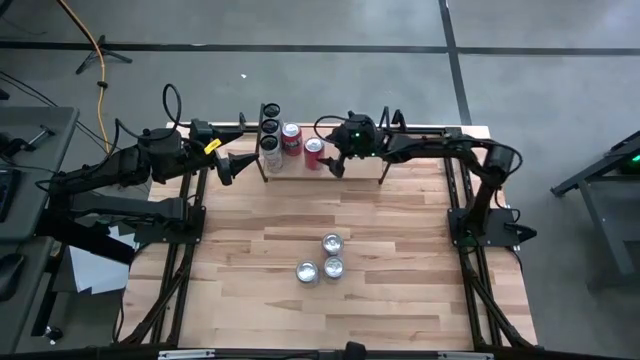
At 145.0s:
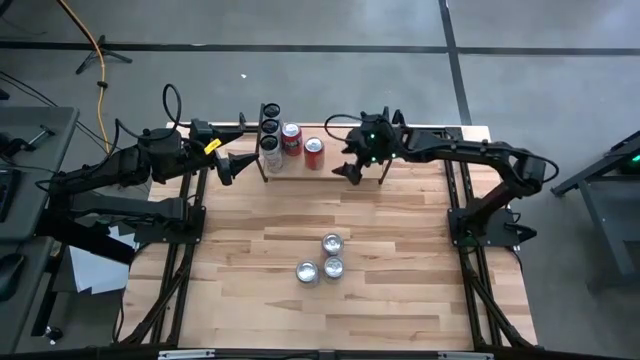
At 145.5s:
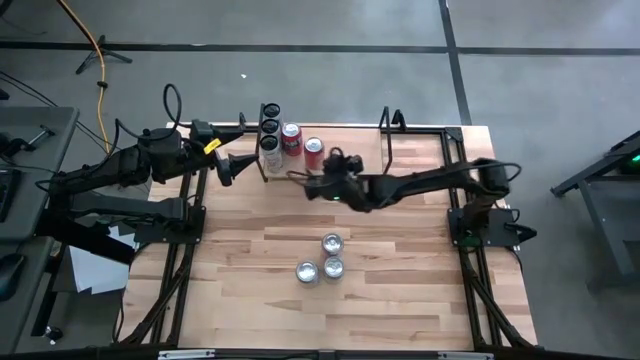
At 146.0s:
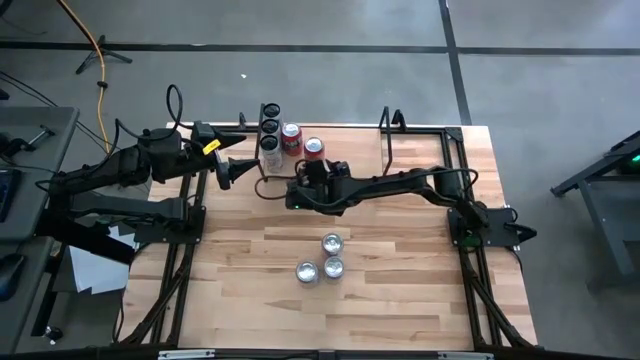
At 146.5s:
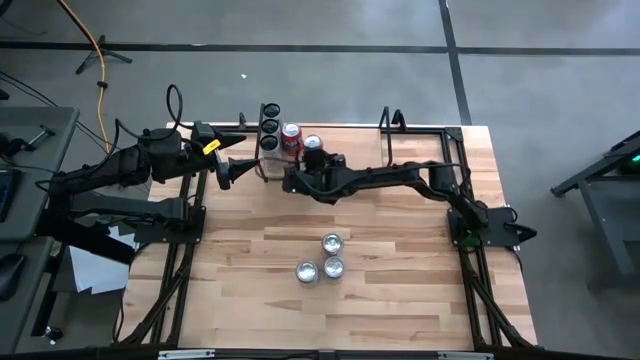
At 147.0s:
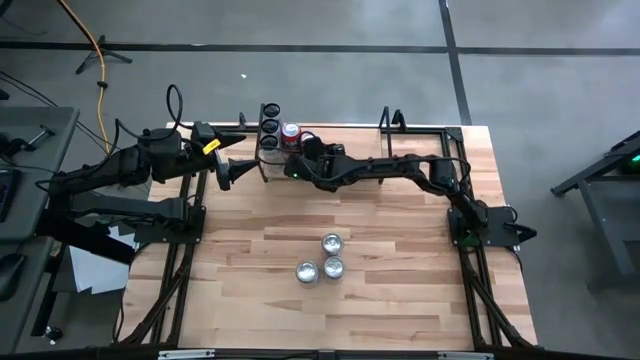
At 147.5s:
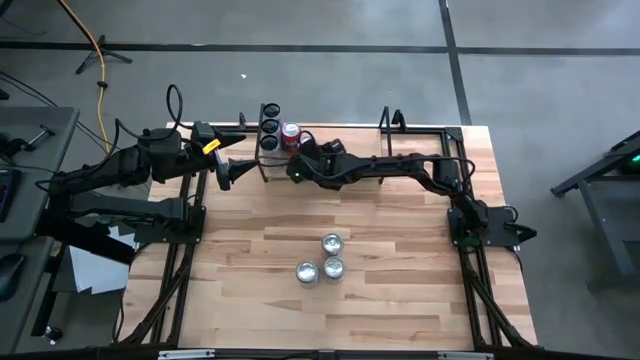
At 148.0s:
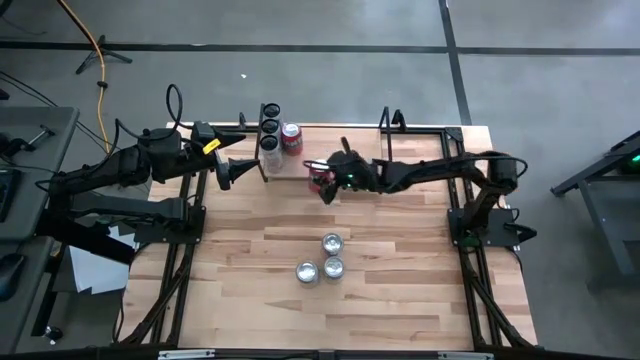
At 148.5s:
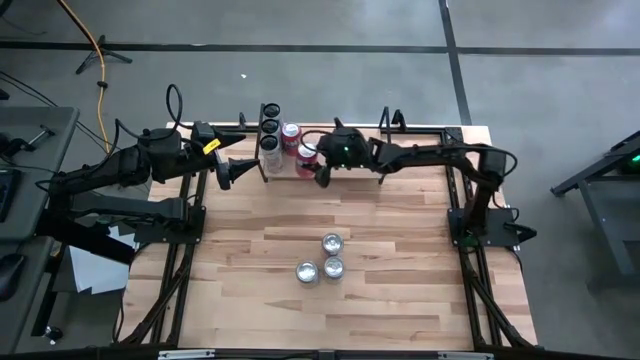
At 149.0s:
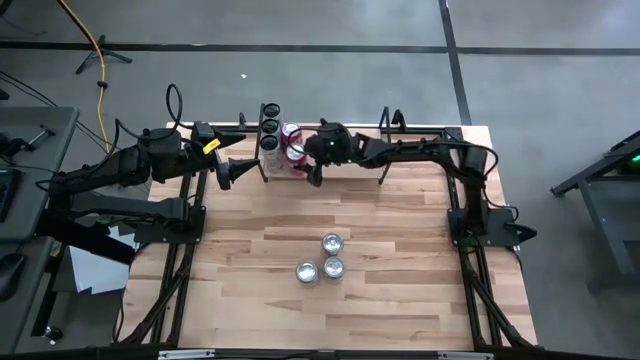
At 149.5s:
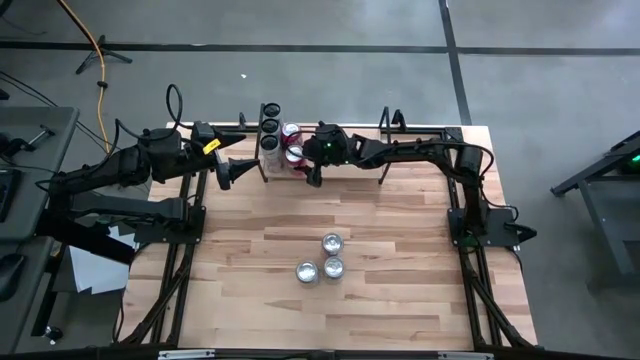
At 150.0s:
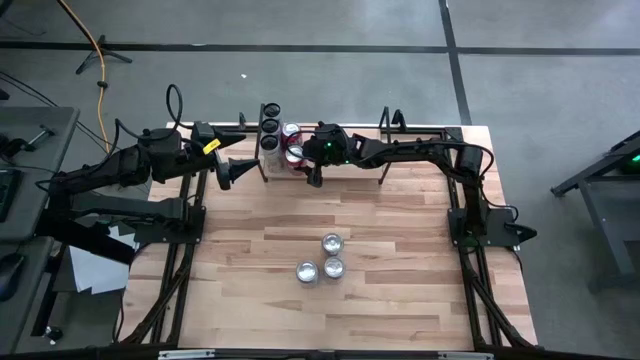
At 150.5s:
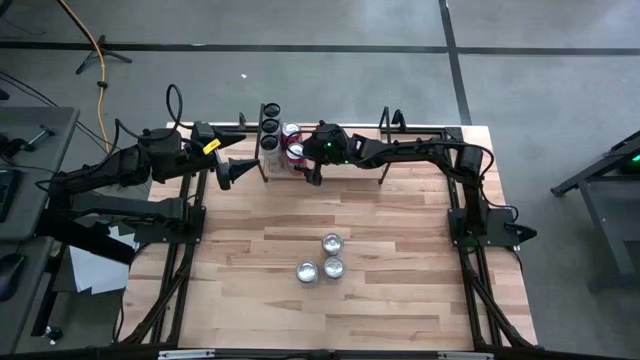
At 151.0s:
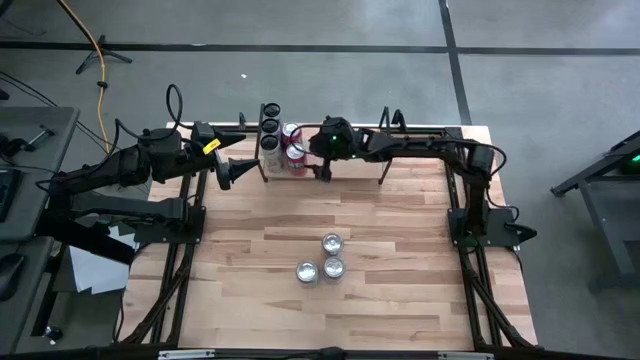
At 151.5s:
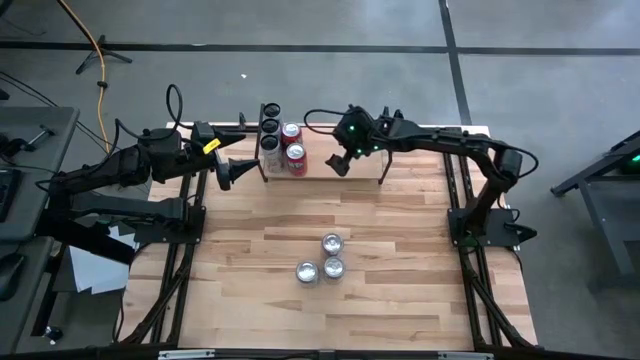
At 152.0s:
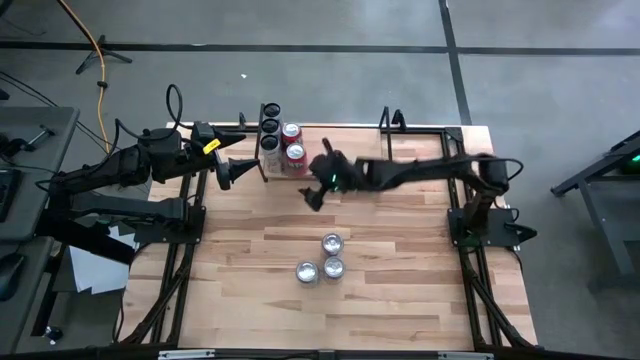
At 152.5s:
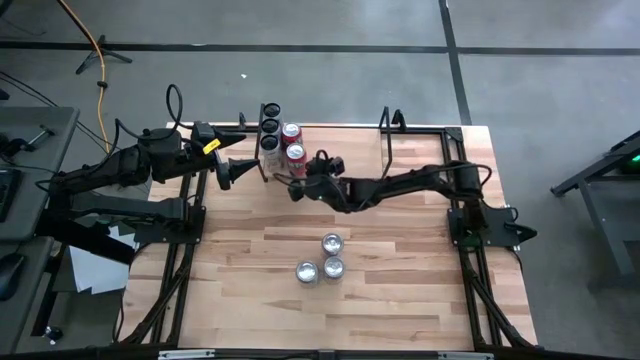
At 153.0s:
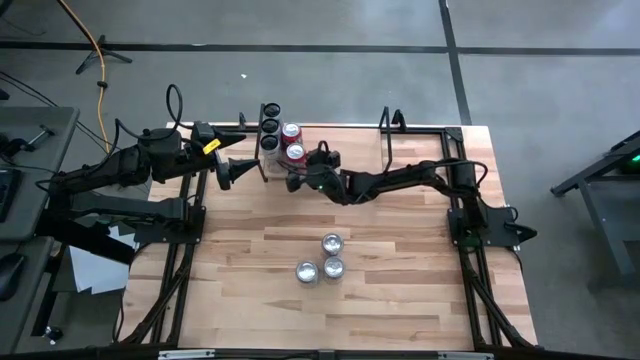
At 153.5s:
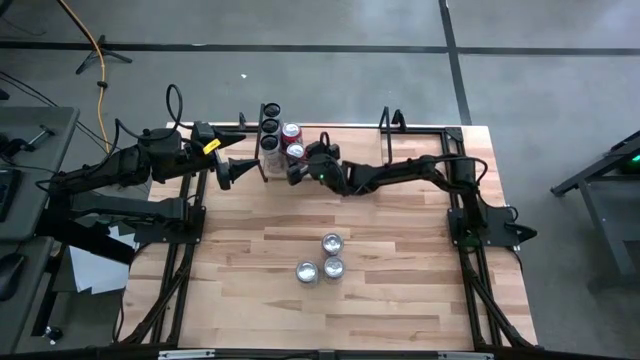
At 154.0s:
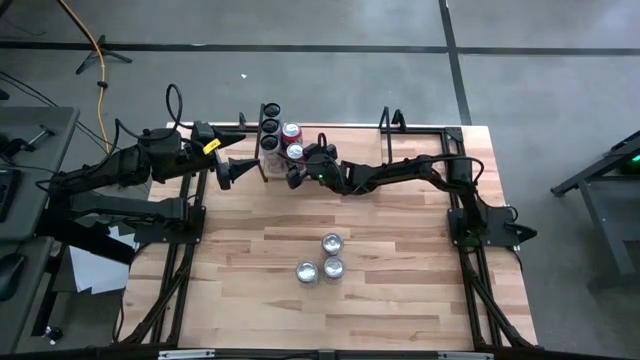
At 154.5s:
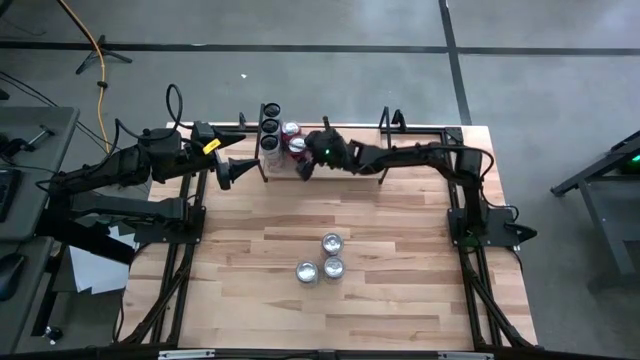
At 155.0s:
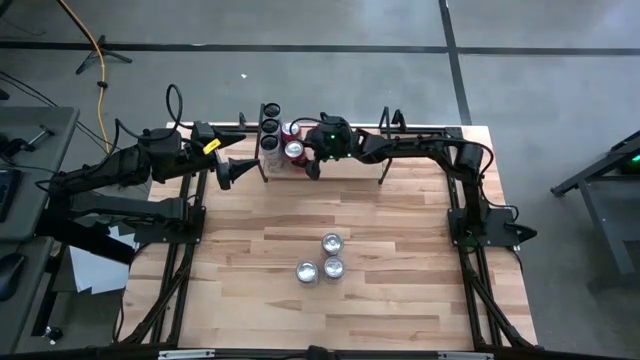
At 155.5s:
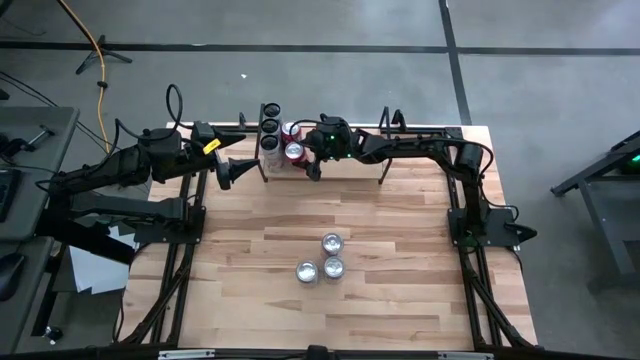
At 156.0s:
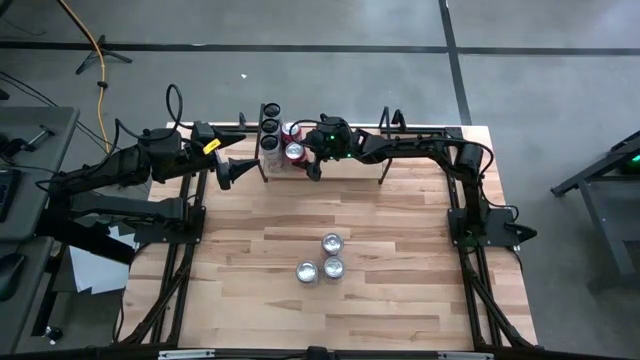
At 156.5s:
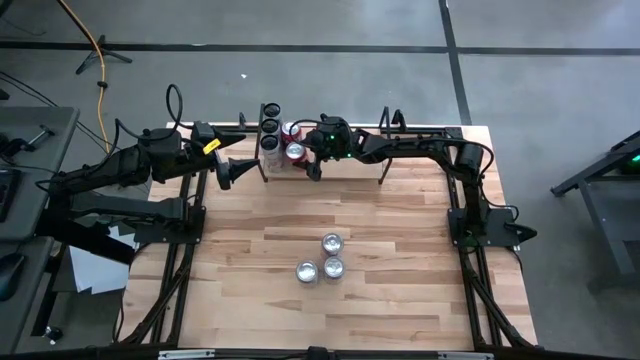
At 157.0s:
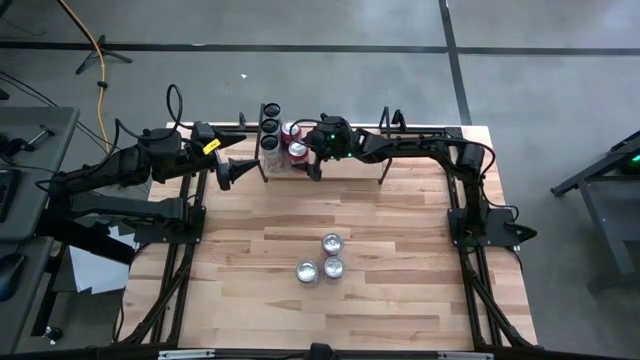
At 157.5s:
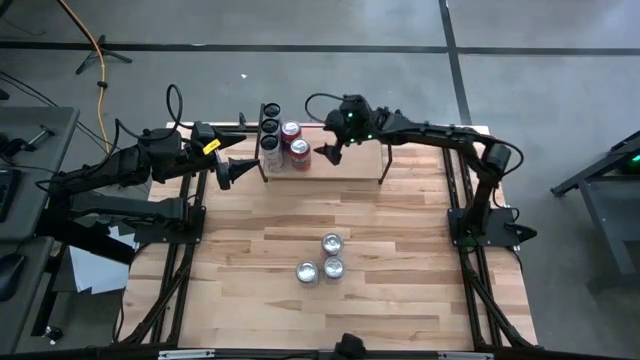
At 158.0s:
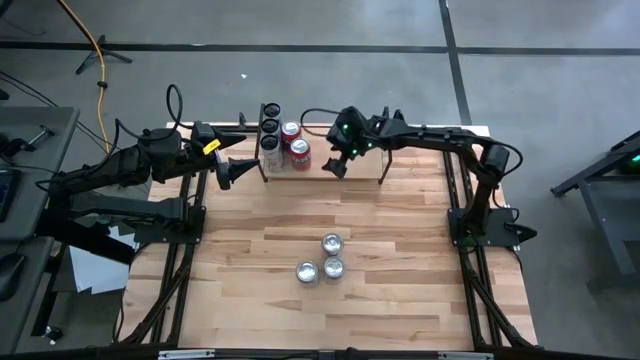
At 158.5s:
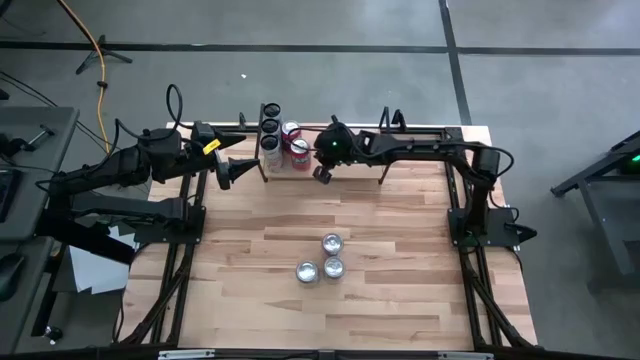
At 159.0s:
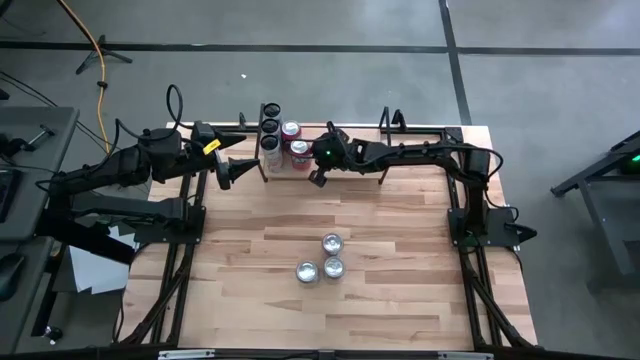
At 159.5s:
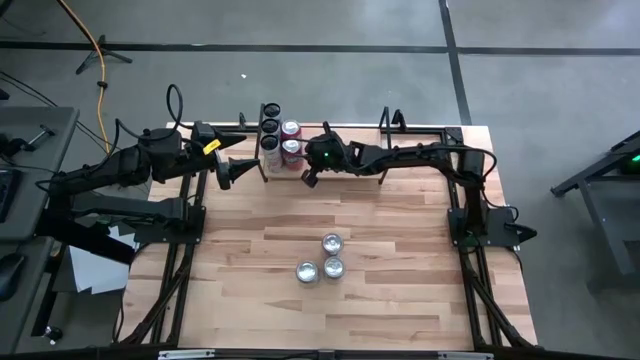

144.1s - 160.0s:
Task: Place canned beverage on shelf
Put the orange soda can aligned with the other orange soda can on the shelf

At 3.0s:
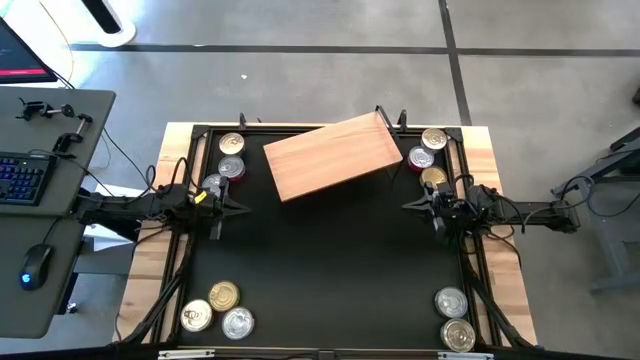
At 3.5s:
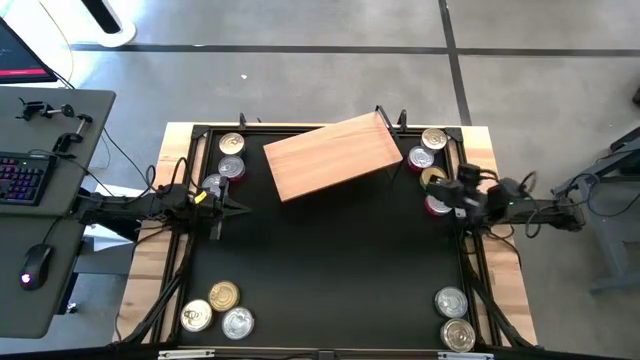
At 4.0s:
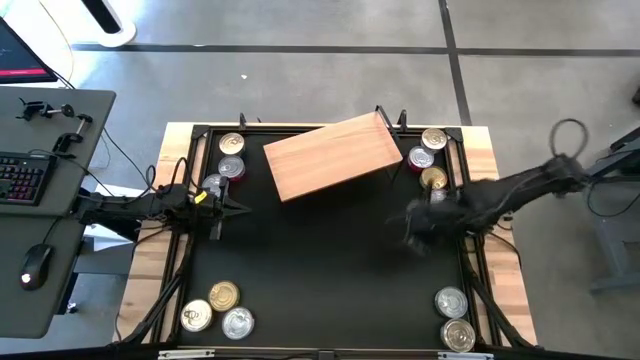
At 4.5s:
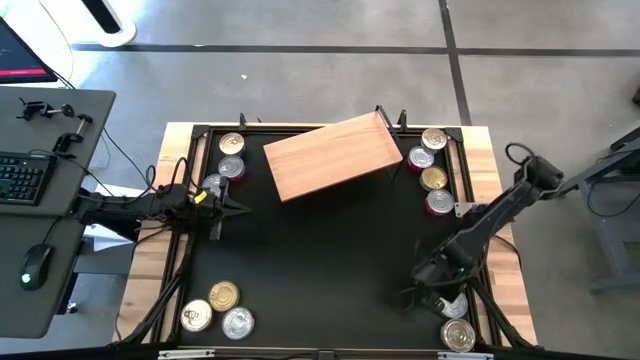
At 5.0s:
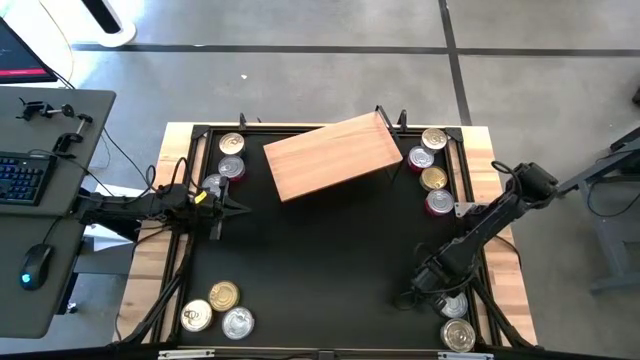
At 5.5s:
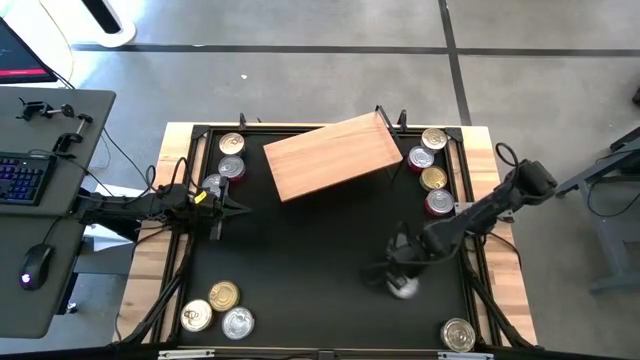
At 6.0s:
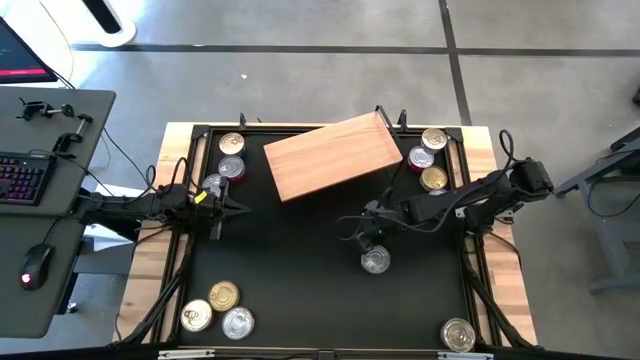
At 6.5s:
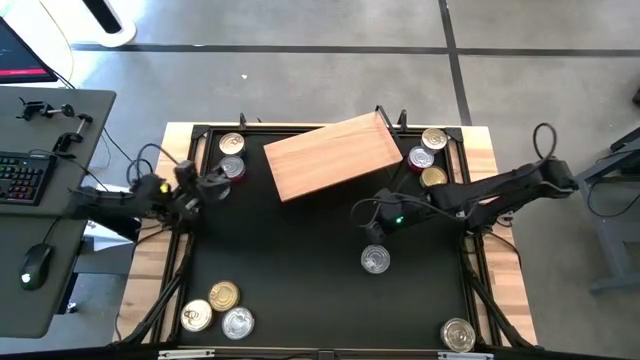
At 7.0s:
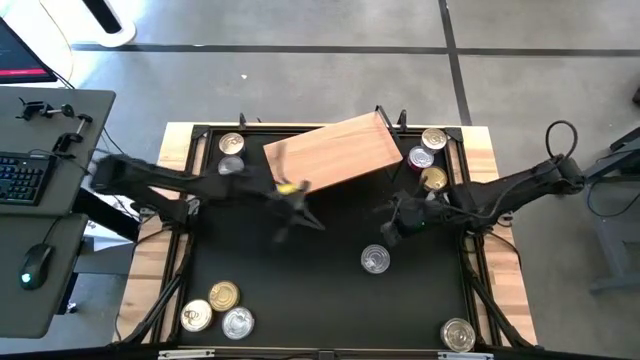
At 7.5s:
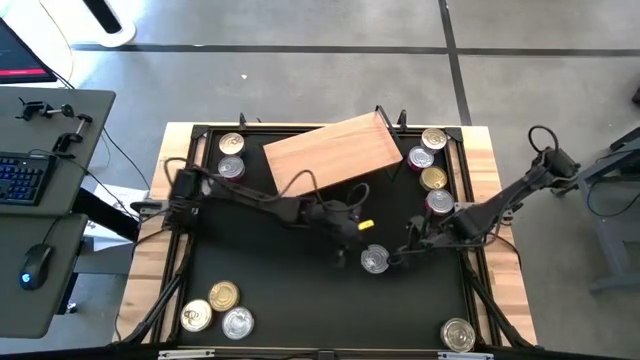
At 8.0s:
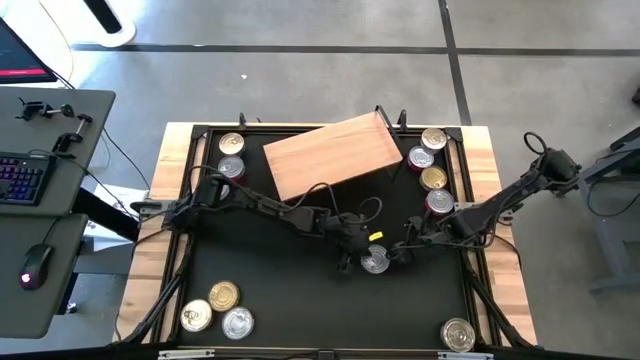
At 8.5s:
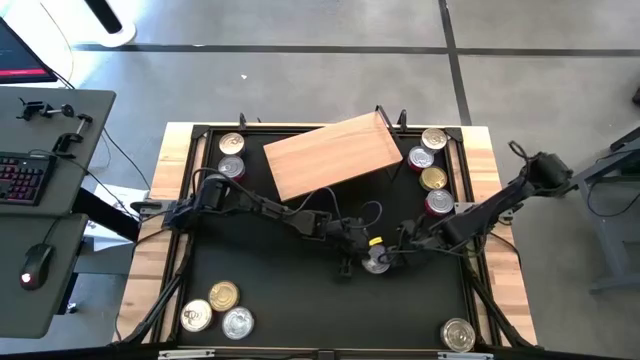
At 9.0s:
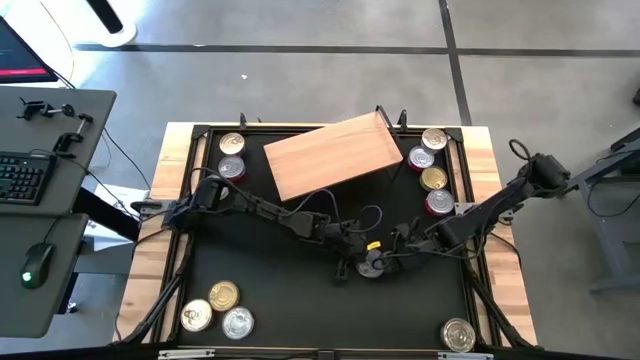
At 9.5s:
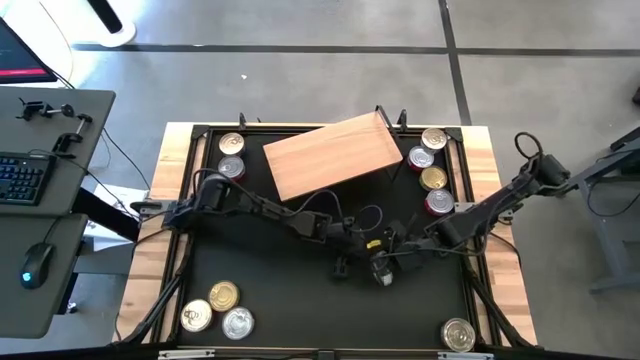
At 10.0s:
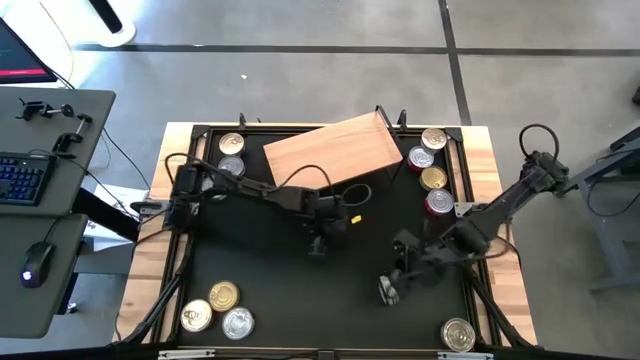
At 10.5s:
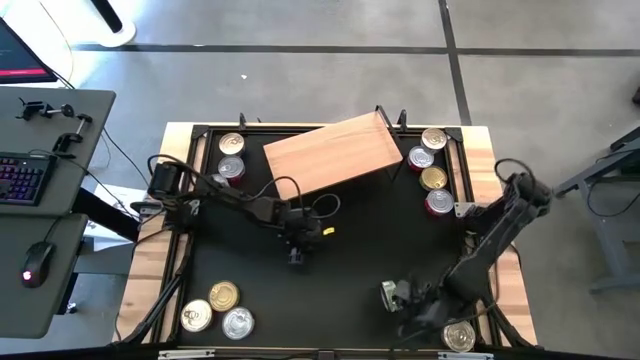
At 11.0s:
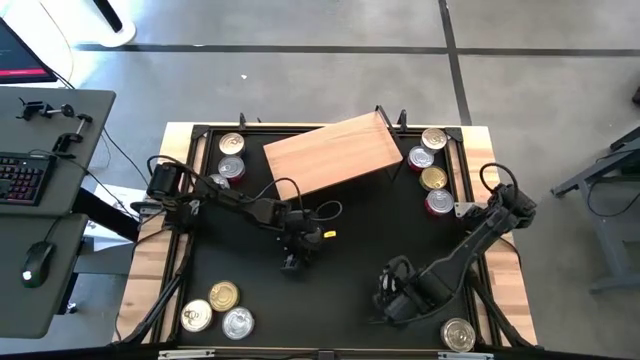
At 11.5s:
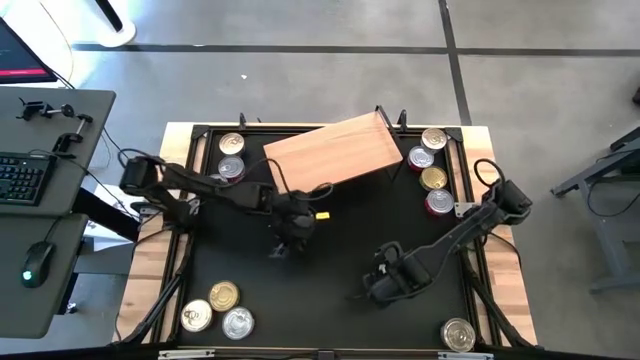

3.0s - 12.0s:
Task: Stack canned seafood by type on shelf
Put the bottom silver and green tuna can on the shelf
